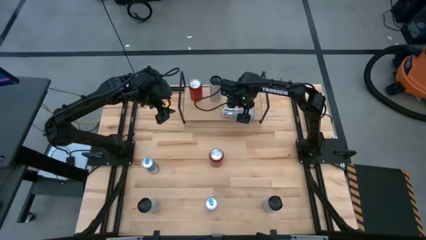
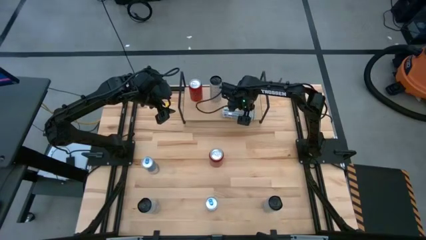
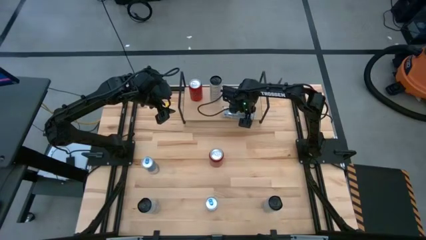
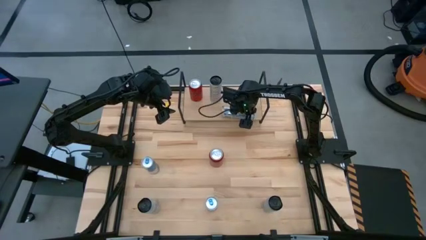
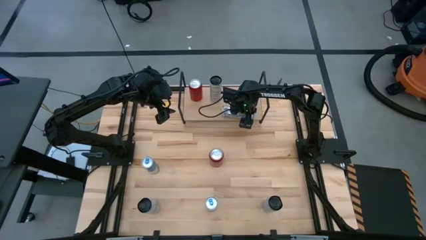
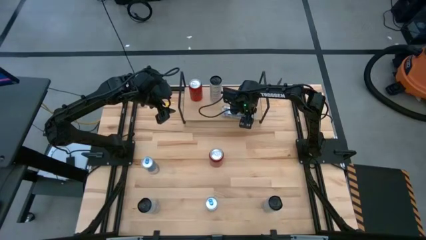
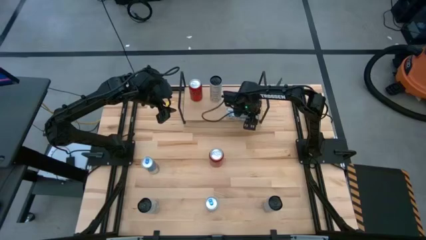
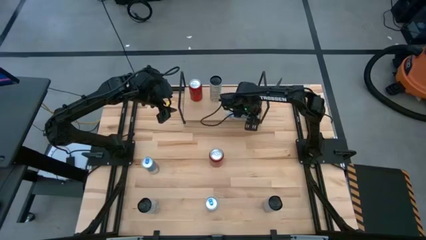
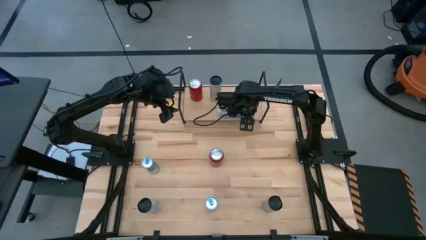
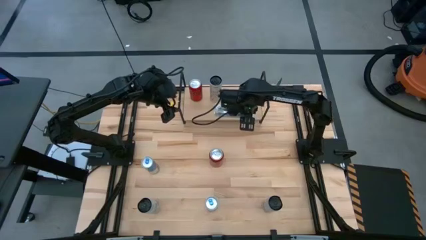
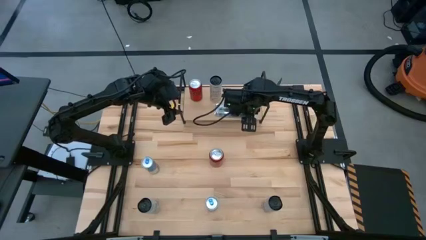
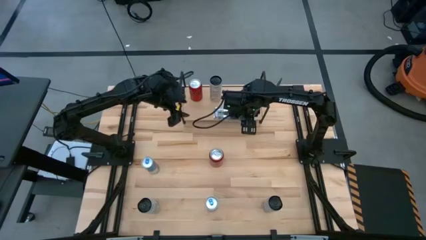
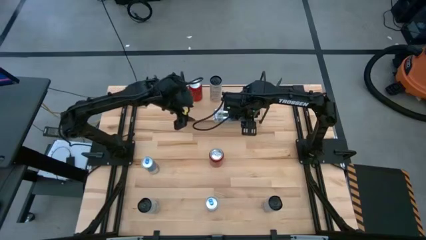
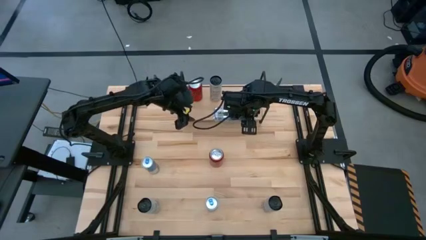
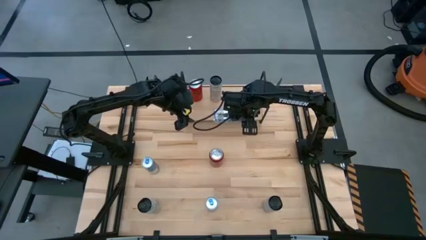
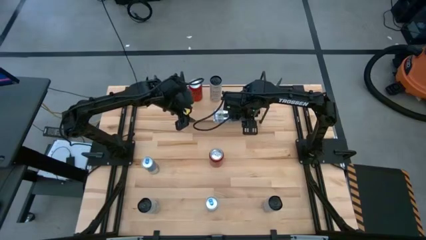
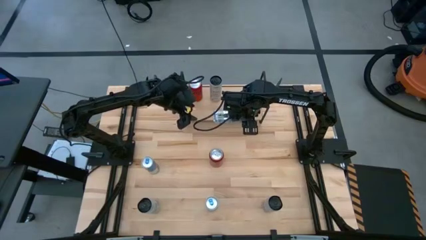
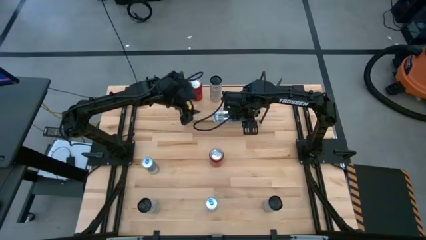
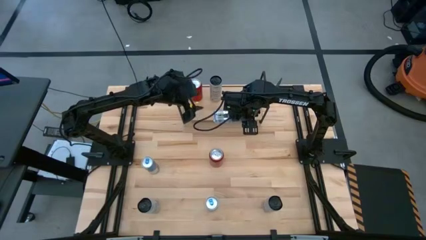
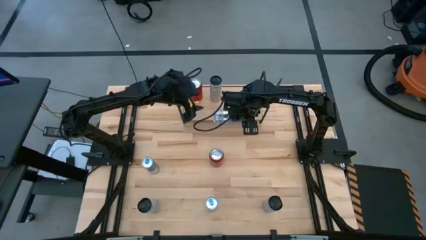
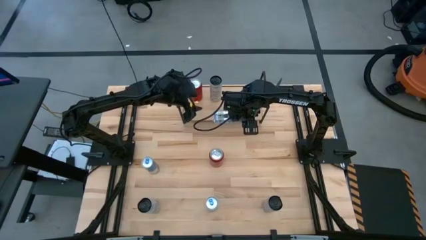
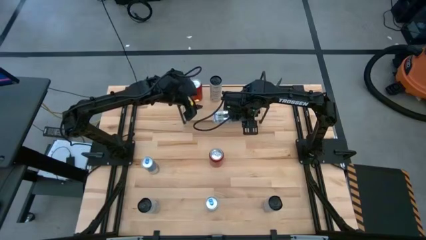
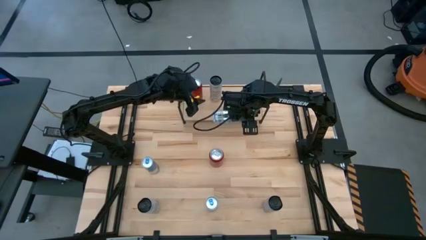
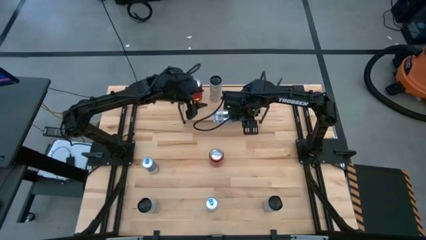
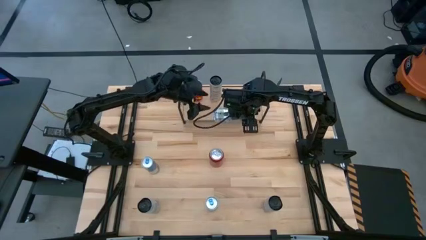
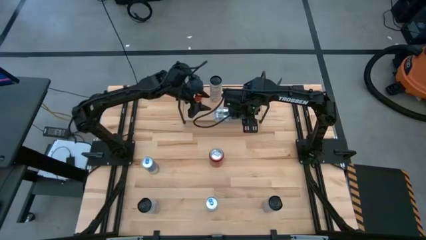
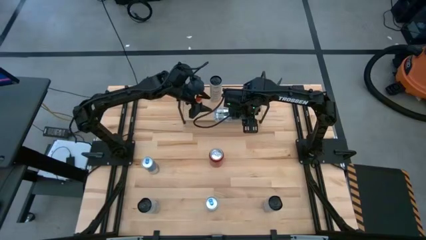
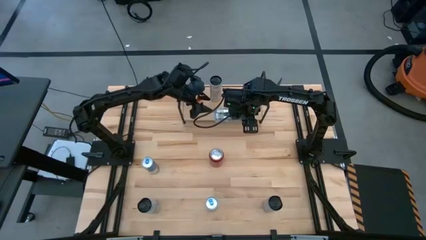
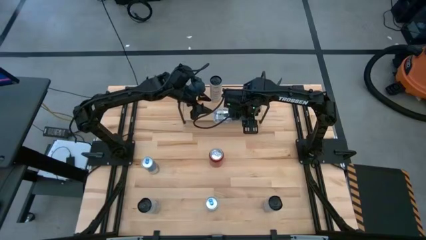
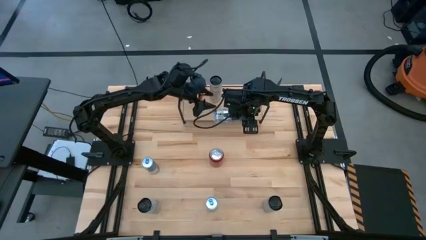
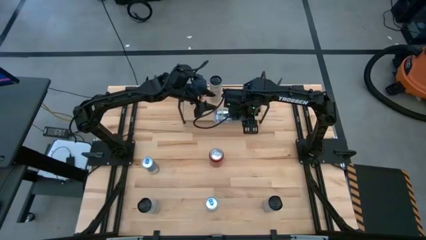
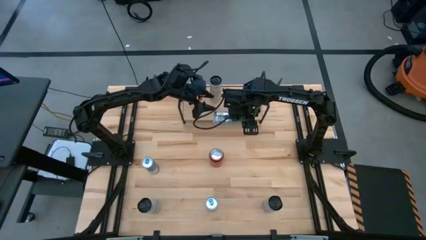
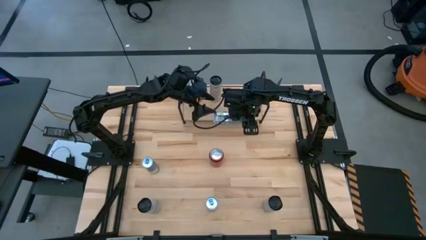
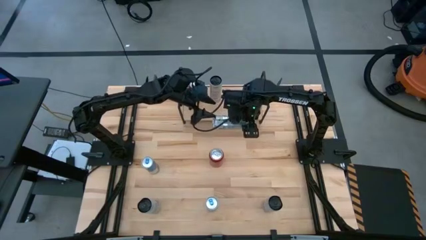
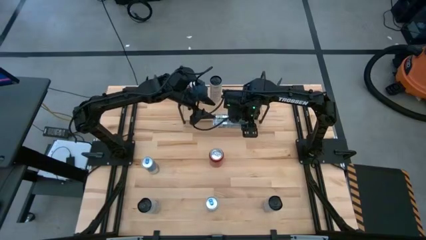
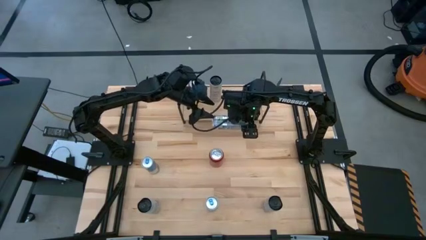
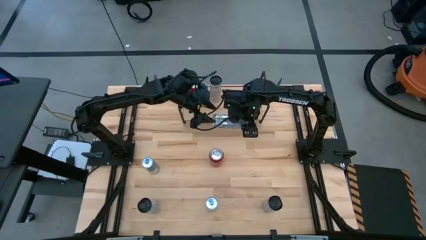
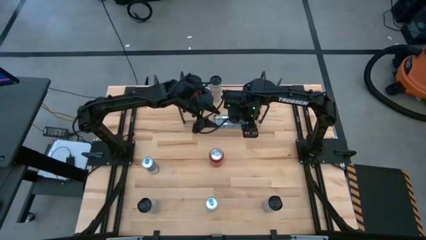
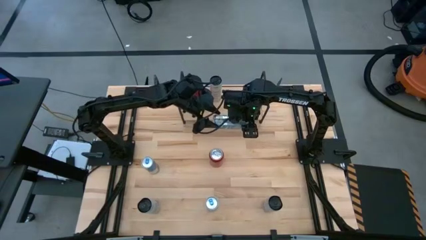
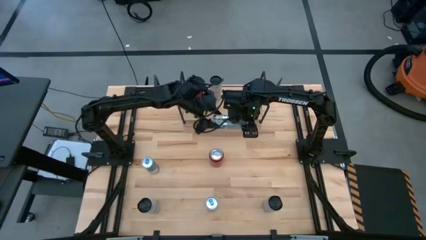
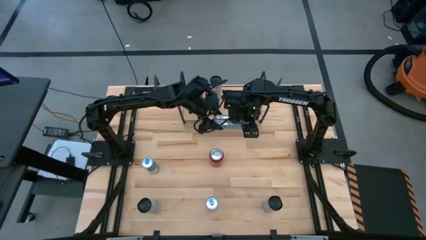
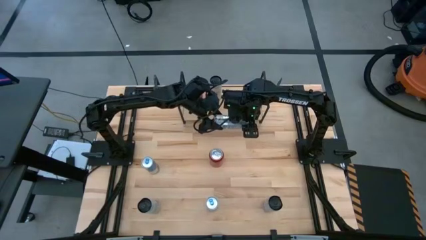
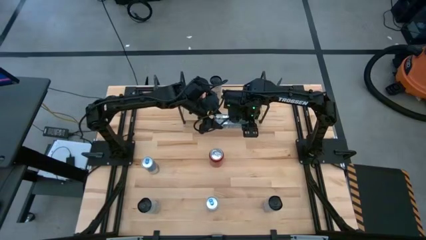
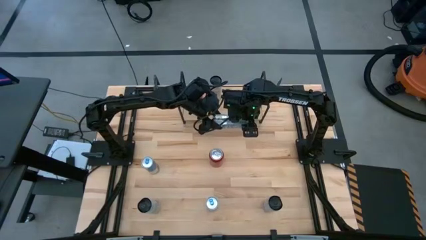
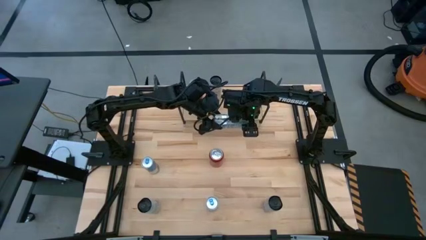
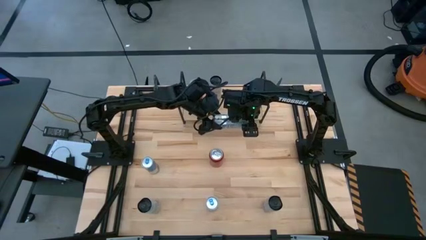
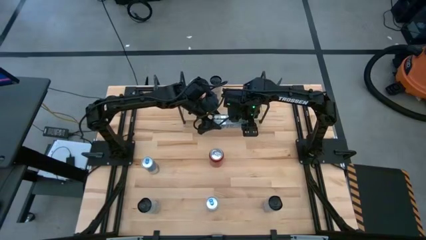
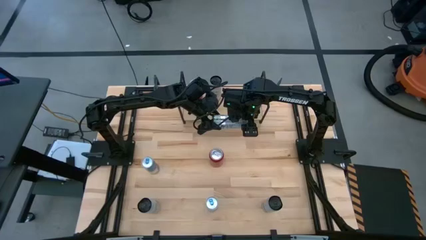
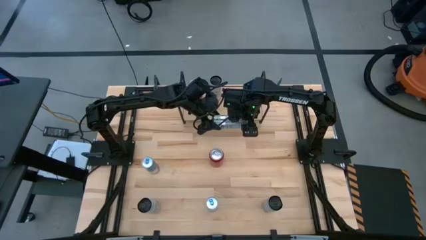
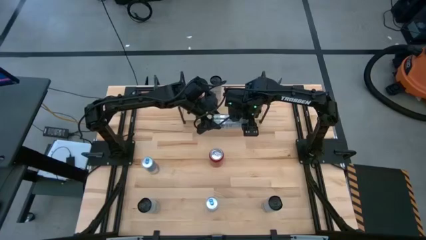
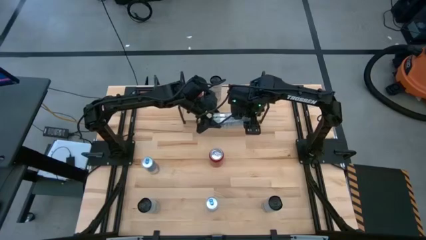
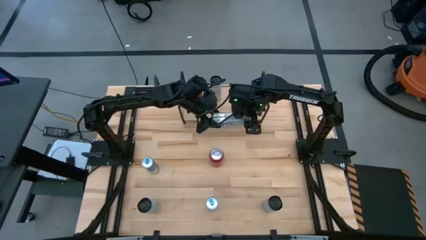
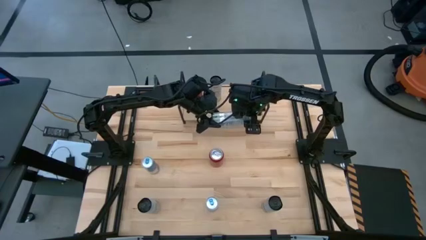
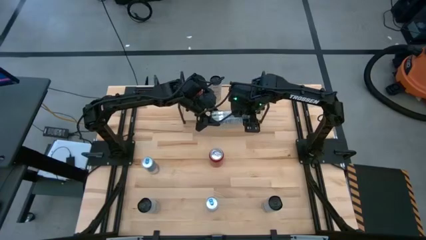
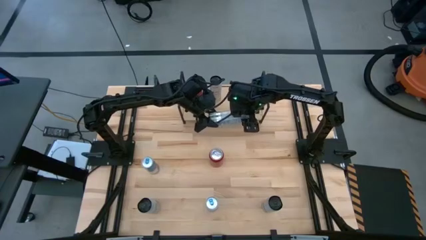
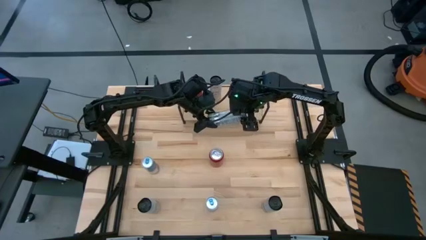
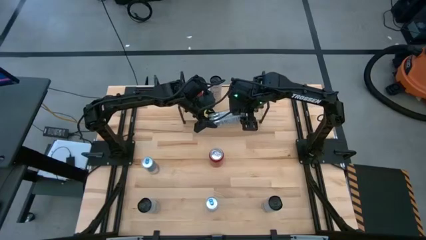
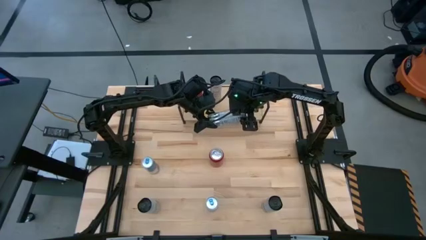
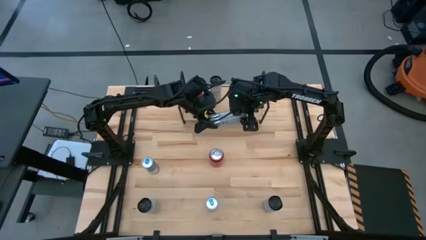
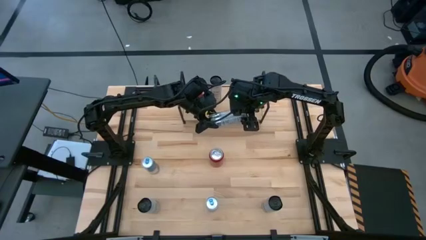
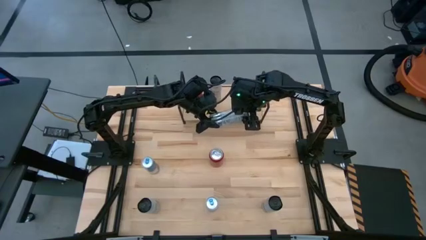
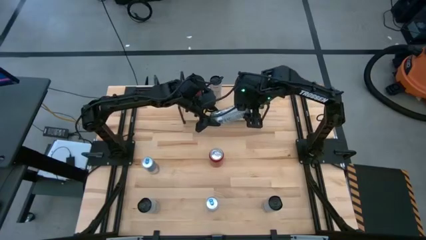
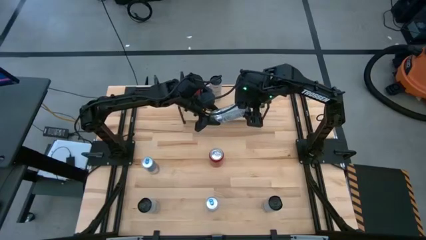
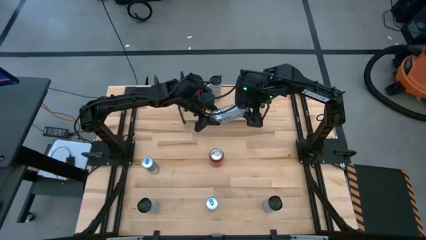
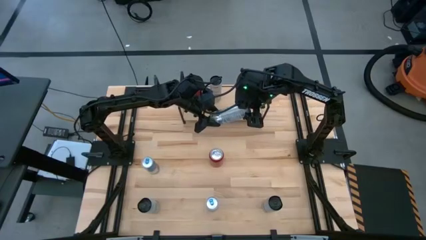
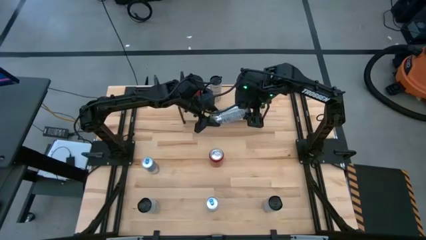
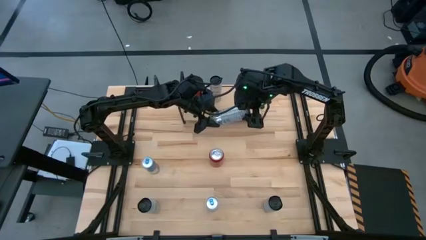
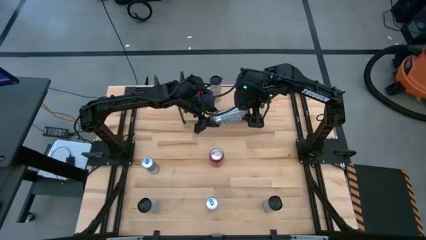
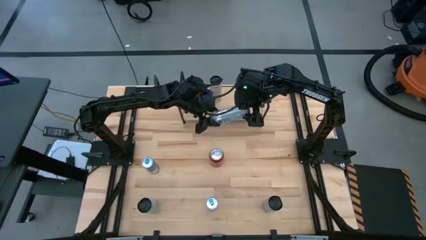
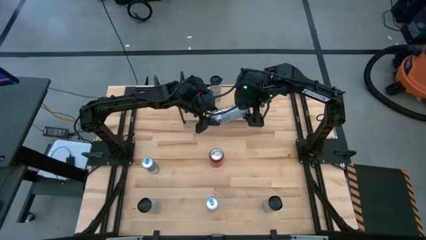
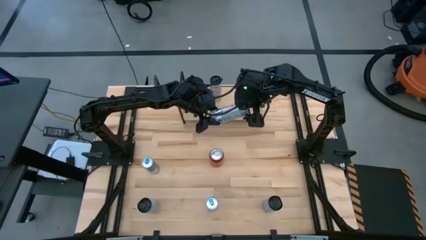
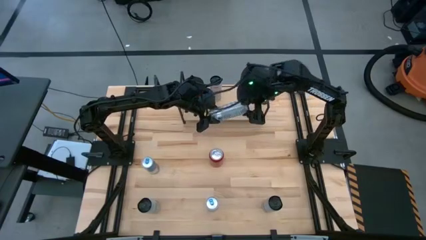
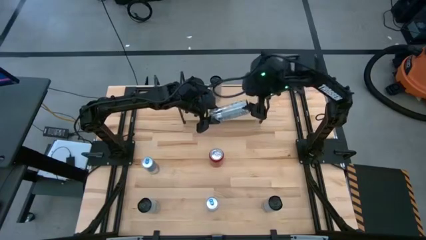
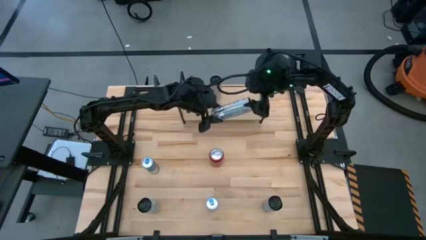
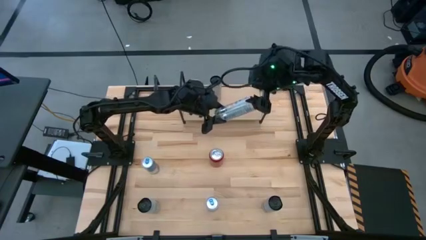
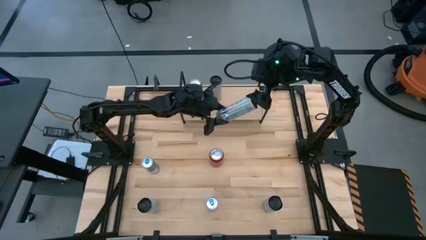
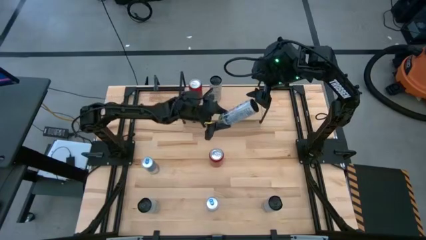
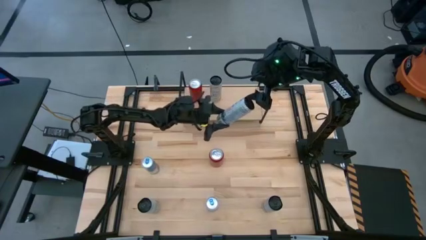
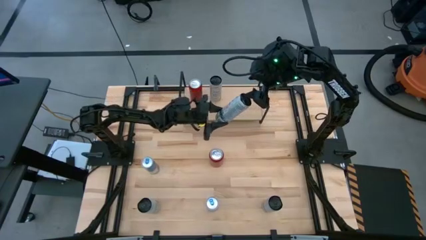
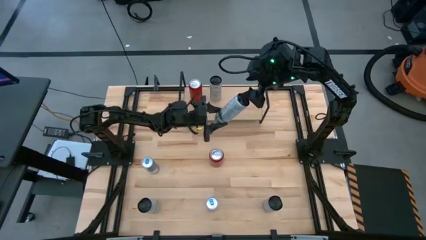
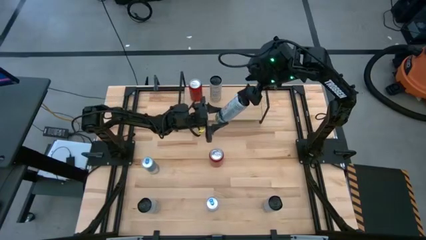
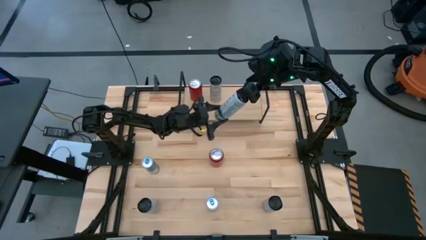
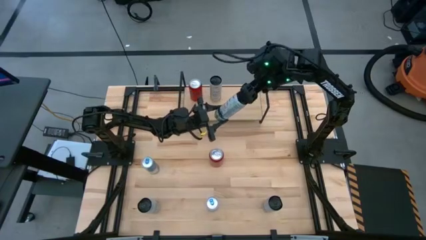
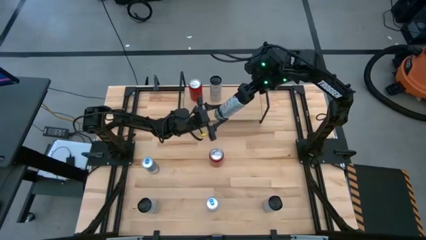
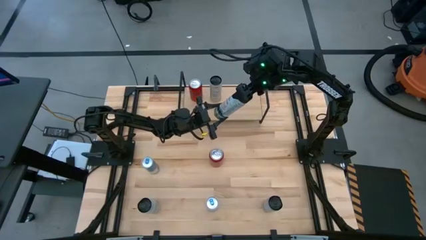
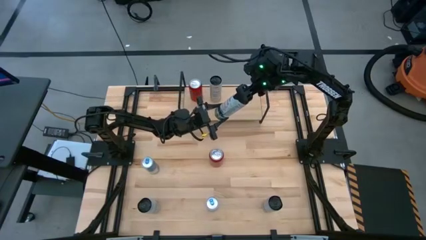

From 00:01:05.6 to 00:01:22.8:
Task: Place canned beverage on shelf
Put the white yellow soda can aligned with the other white yellow soda can on the shelf
